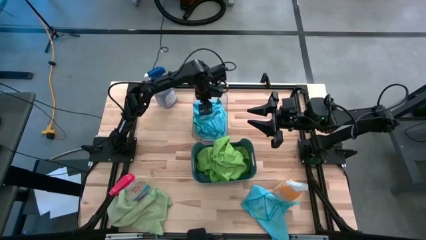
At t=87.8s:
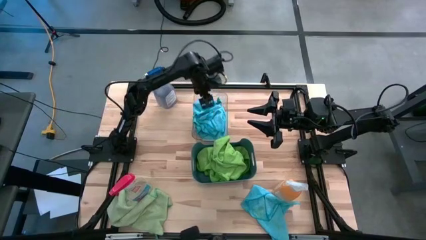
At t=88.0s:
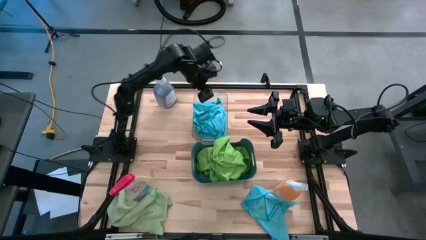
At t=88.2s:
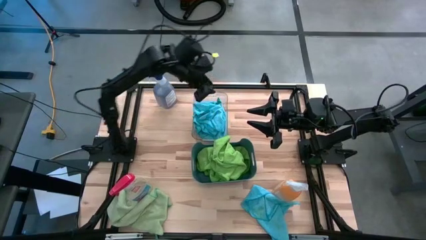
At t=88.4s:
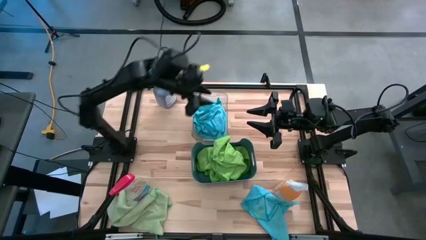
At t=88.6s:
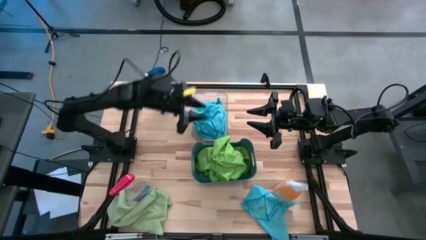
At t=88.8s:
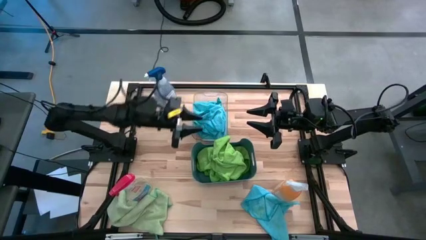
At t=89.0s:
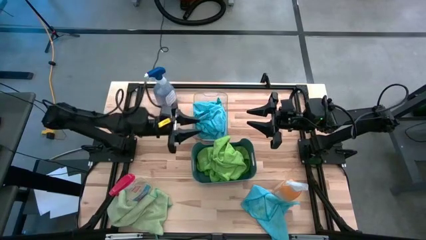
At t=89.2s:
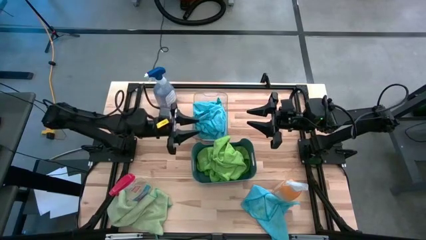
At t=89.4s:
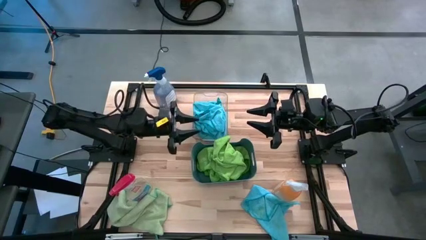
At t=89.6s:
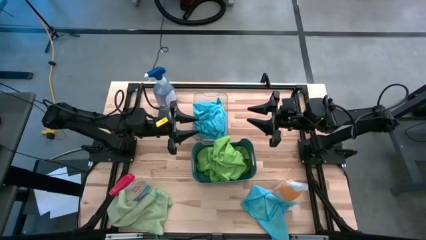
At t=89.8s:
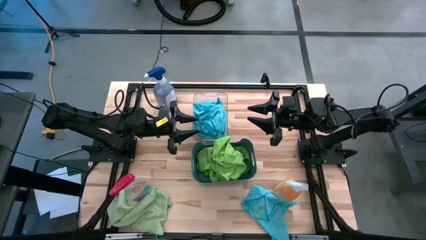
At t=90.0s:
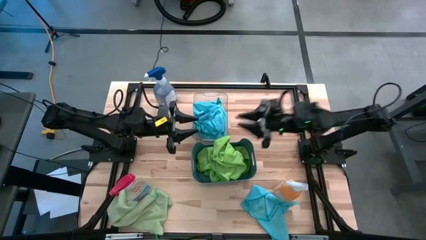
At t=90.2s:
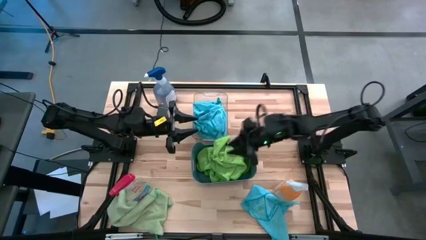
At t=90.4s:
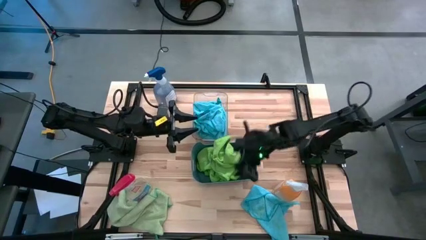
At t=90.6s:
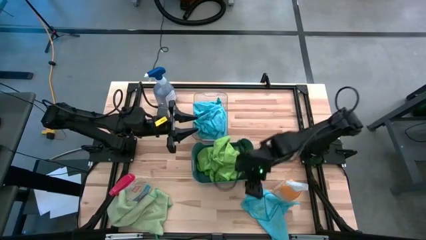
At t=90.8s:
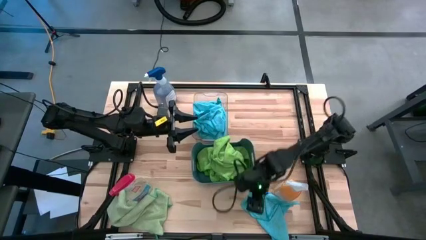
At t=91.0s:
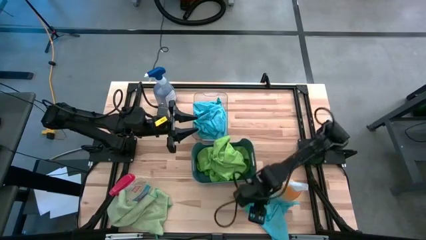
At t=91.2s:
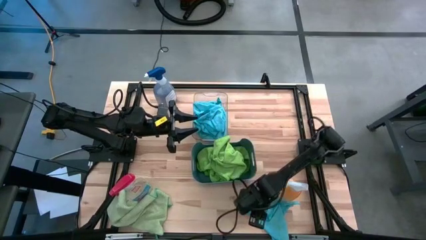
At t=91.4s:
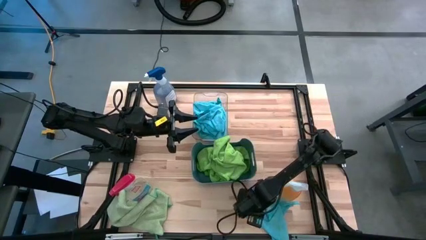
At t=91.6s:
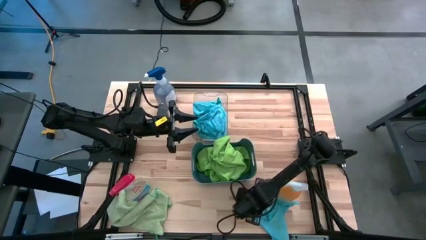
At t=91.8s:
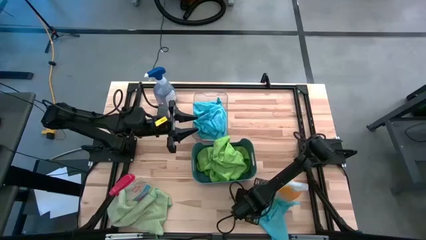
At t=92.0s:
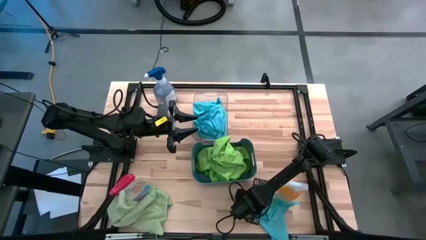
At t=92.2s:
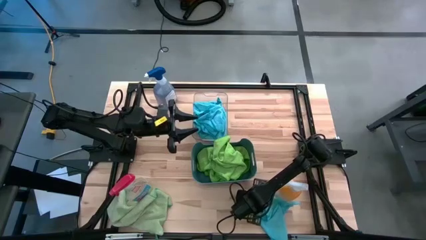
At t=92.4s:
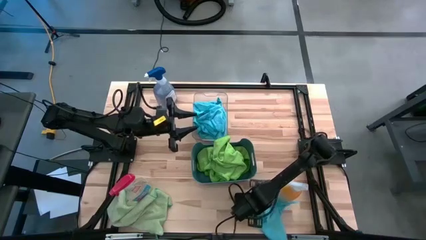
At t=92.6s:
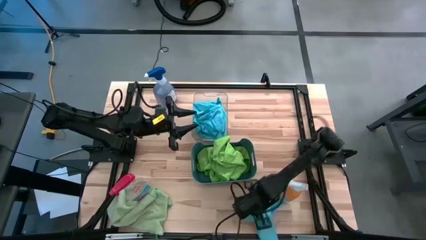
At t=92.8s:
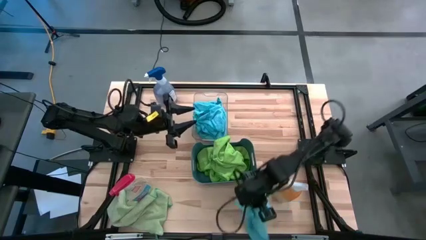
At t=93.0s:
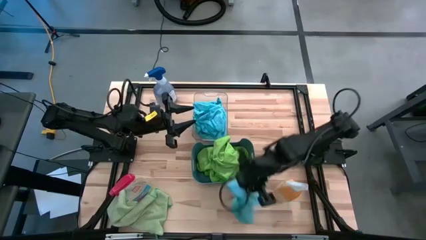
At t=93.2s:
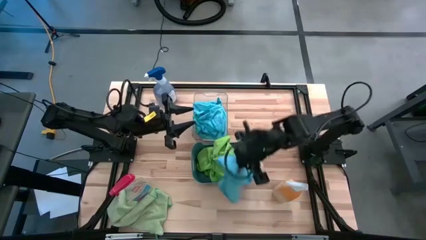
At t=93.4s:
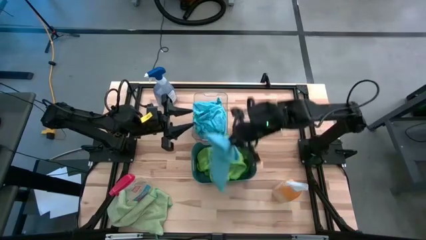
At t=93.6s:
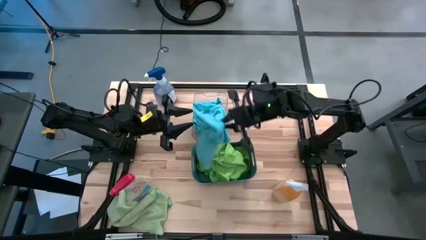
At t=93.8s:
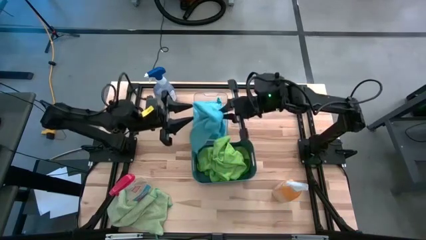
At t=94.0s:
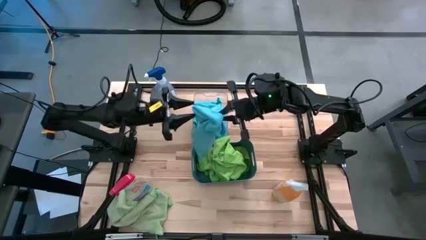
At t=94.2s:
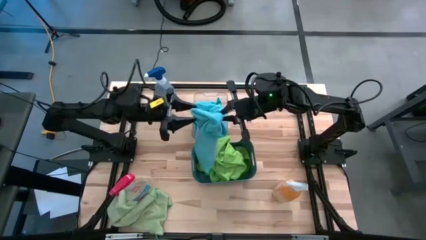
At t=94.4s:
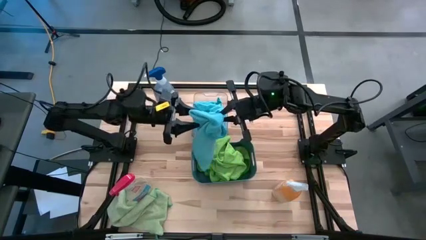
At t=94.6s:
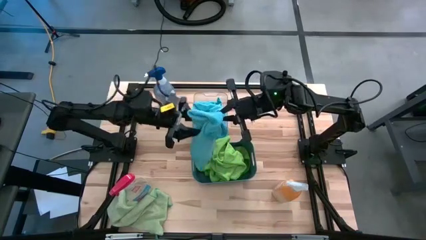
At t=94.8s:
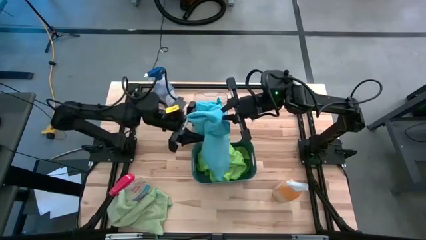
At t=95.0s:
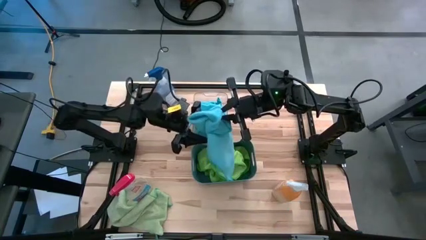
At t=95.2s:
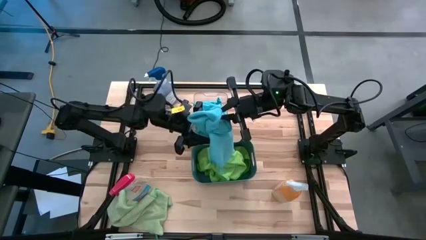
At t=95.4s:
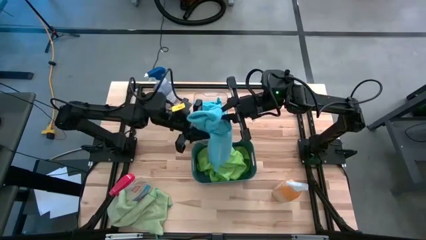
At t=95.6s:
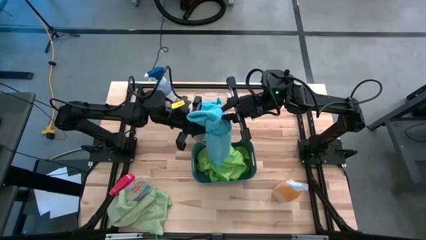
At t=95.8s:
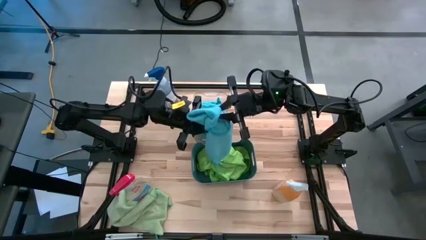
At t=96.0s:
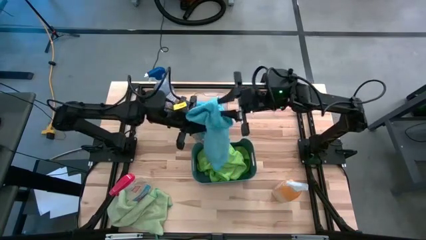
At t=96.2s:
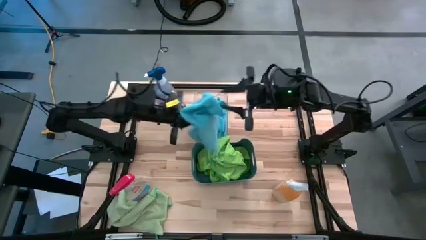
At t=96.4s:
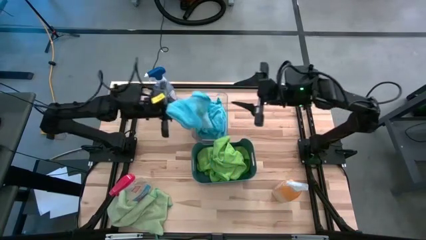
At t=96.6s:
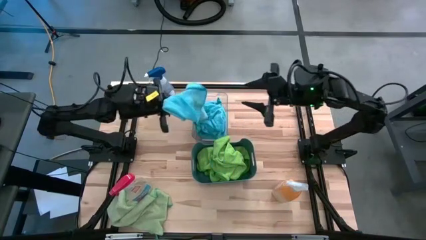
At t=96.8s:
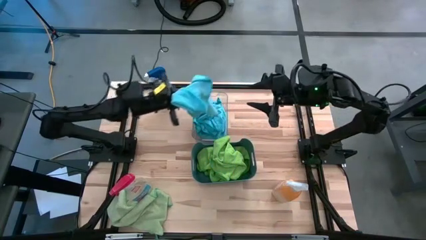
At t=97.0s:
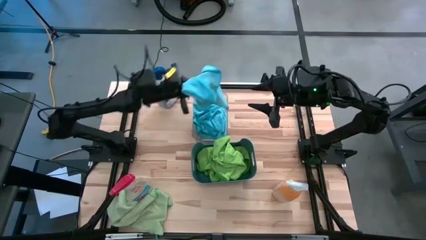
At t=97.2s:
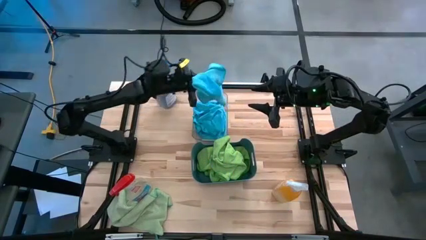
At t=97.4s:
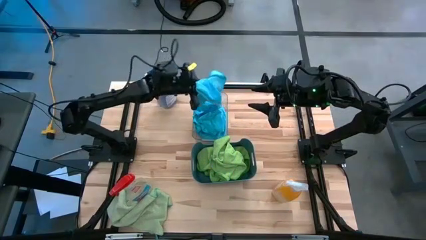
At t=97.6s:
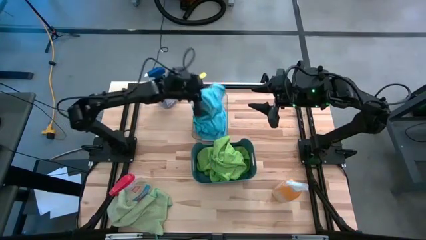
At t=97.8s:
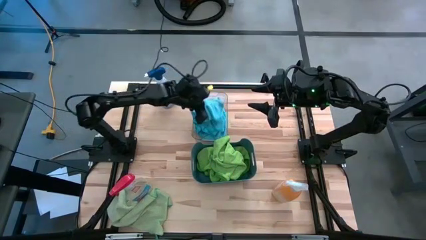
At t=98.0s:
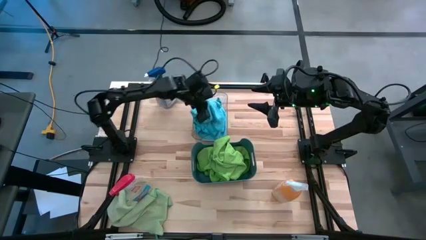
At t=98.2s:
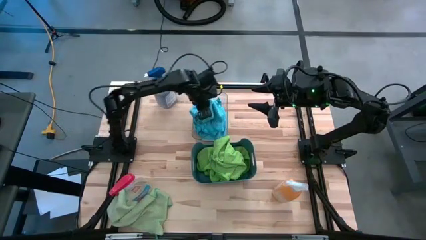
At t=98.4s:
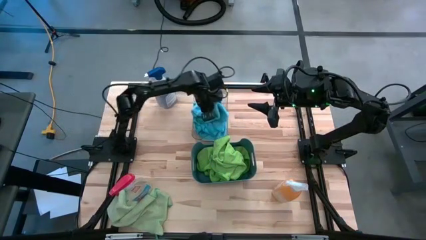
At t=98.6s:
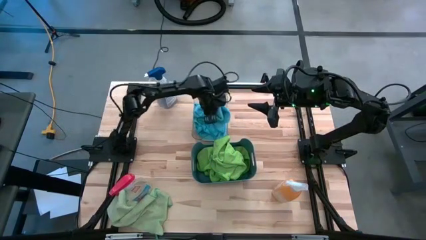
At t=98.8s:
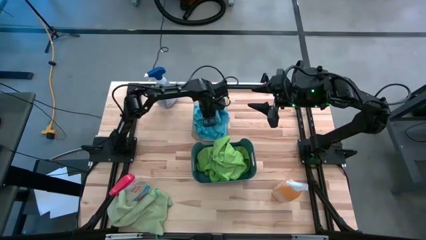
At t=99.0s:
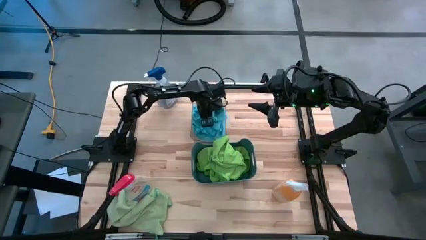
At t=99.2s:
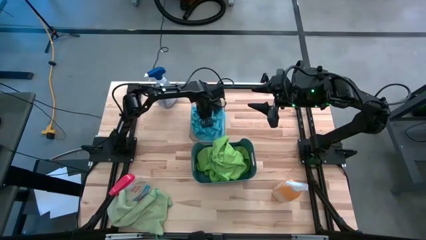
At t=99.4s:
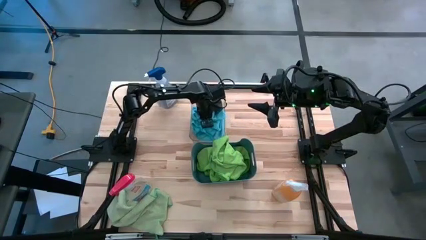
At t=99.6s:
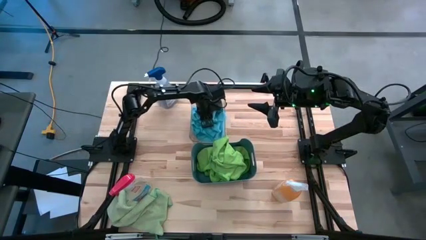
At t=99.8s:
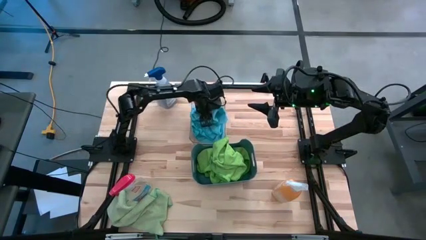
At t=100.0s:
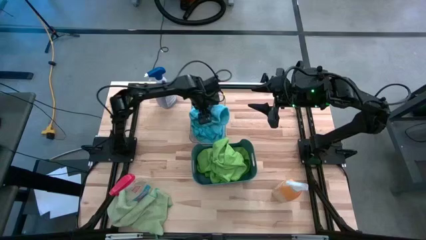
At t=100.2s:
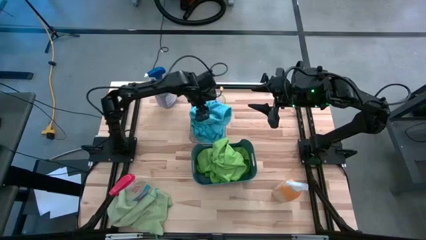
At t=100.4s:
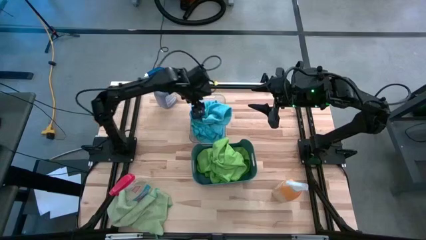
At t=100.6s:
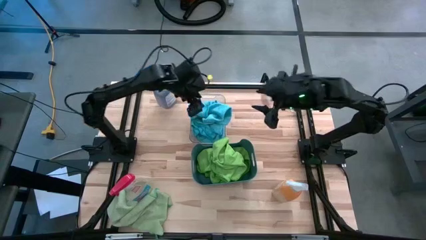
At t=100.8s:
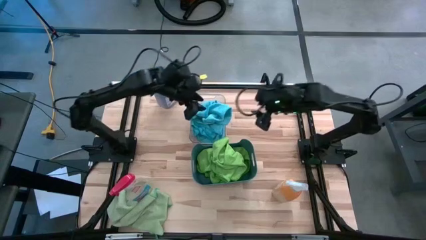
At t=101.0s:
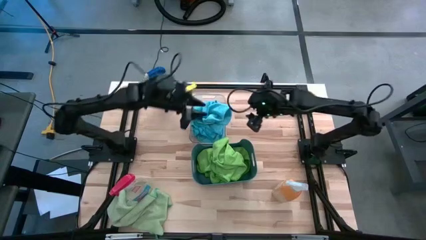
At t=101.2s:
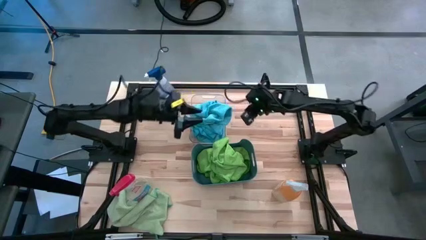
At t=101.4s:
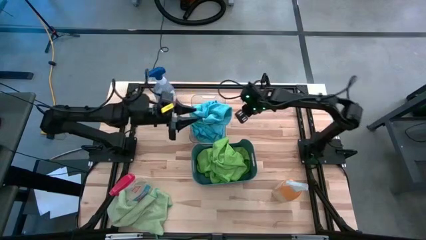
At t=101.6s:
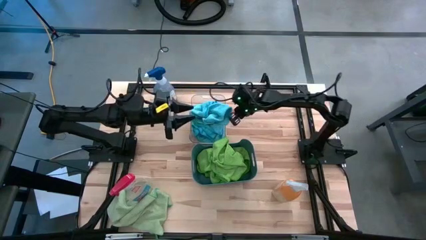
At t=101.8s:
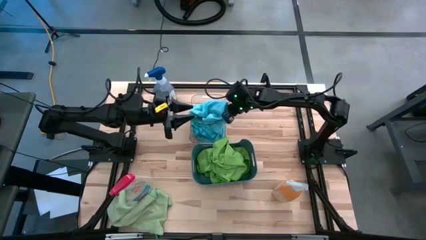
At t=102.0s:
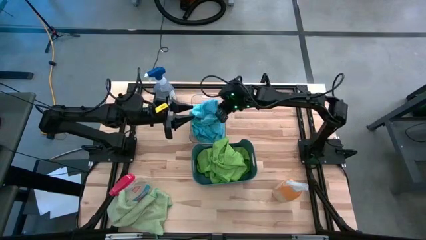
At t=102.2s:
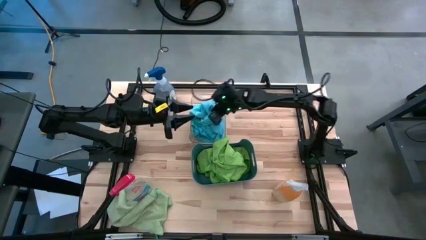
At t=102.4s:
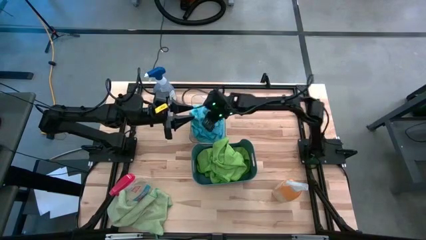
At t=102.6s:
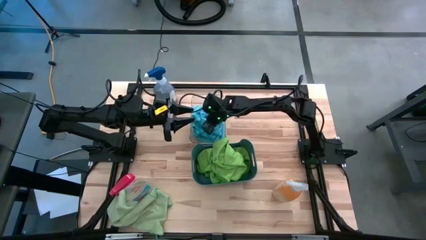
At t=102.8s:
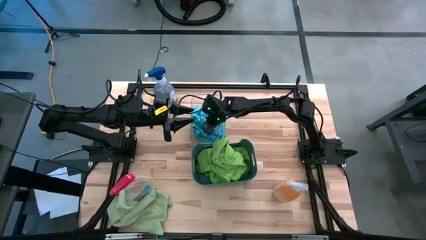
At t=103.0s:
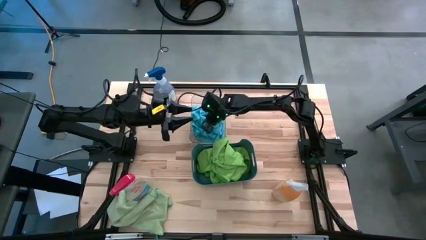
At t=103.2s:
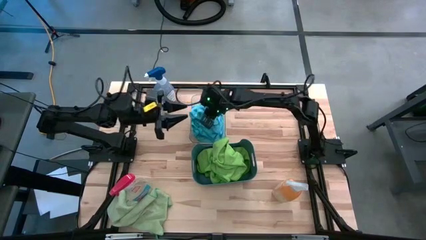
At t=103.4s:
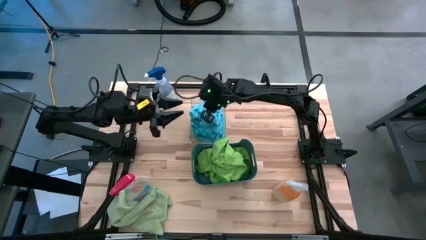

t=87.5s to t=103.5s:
Task: Sort microfiber towel by color & place in baskets
Put the blue microfiber towel into the transparent bin
